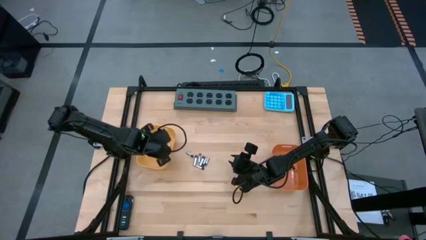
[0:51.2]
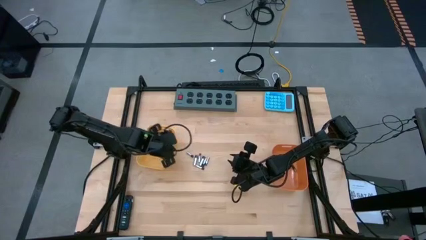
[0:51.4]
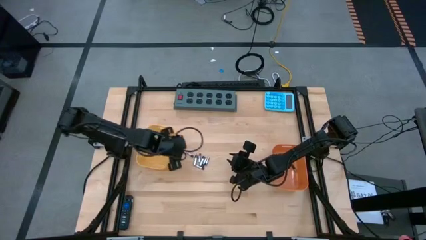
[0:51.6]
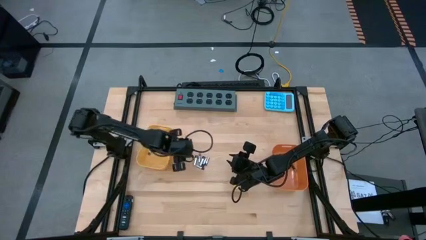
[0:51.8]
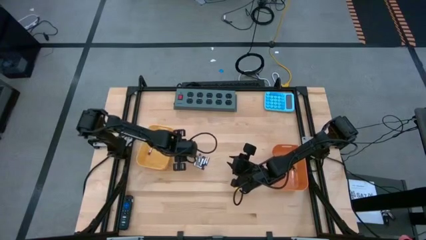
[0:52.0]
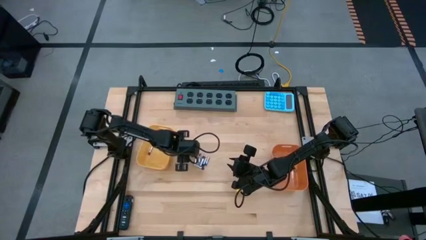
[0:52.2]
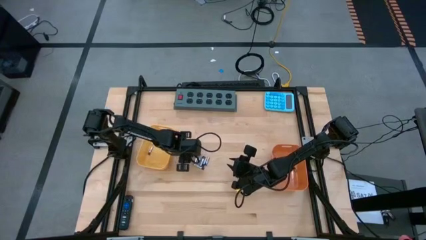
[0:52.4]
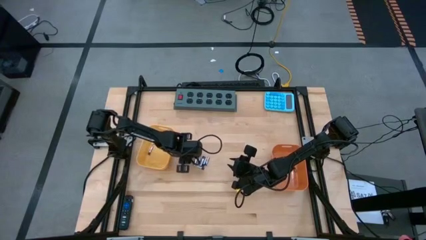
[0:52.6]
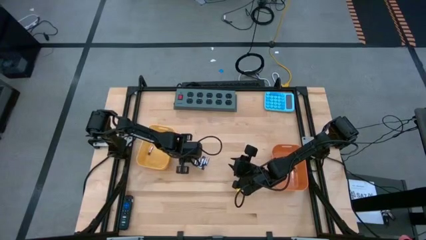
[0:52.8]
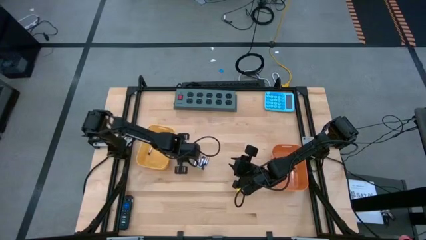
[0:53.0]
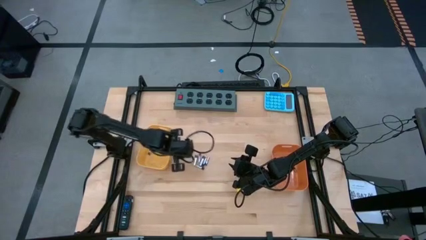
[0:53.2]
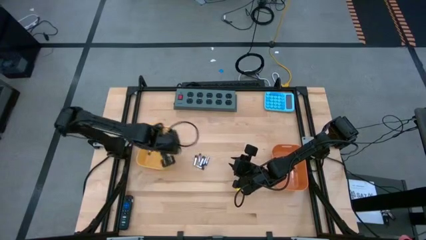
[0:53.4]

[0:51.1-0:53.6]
Task: Sort batteries
Put the silver battery into the yellow bin

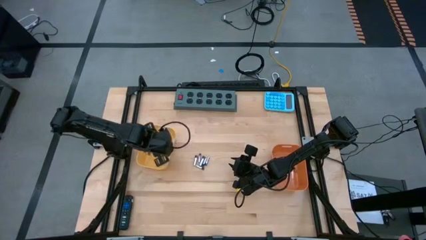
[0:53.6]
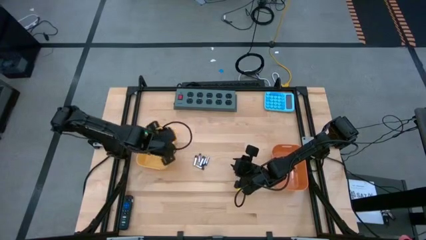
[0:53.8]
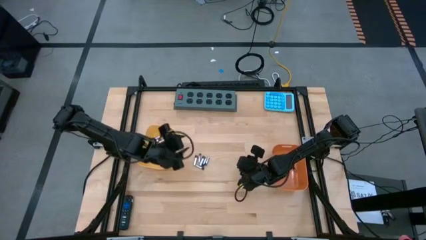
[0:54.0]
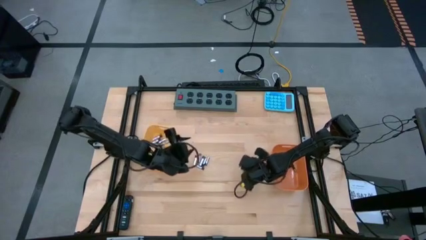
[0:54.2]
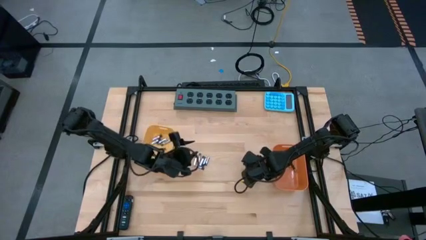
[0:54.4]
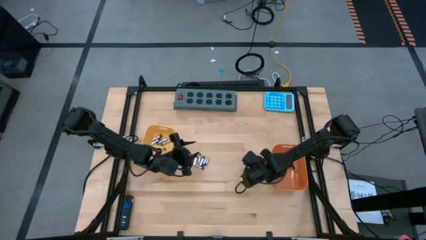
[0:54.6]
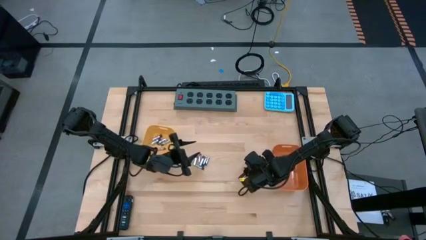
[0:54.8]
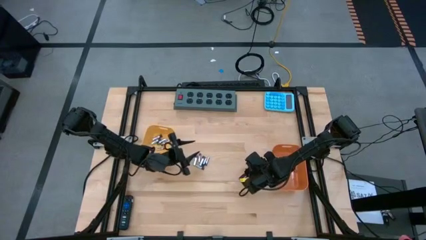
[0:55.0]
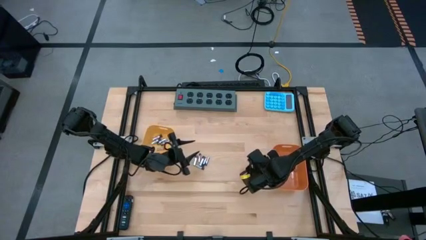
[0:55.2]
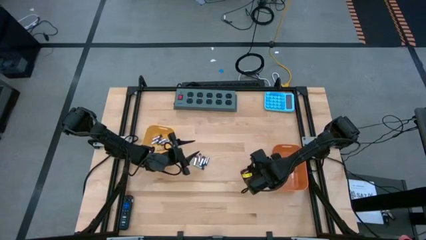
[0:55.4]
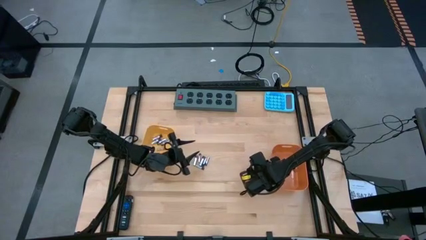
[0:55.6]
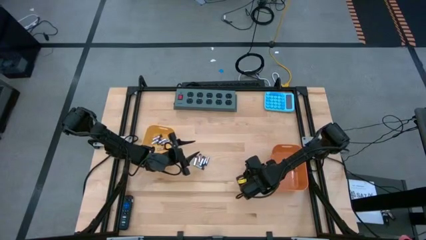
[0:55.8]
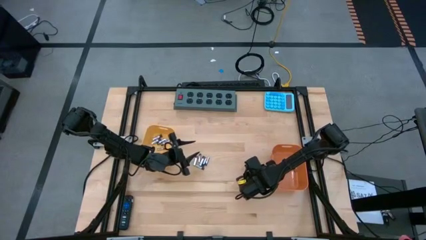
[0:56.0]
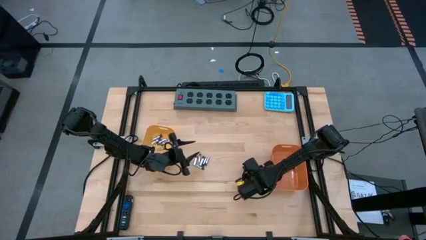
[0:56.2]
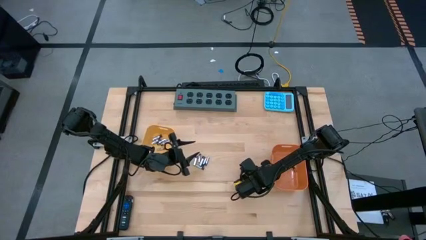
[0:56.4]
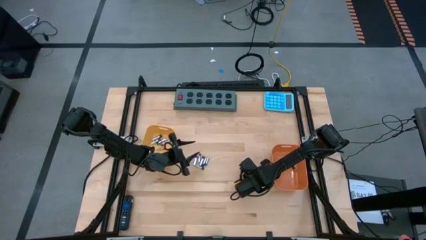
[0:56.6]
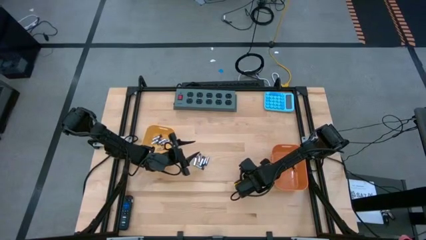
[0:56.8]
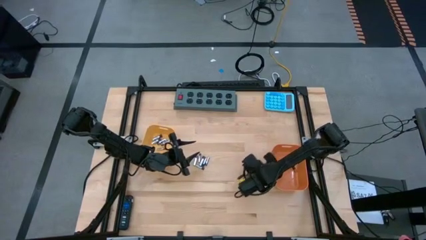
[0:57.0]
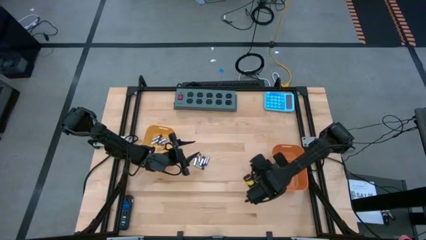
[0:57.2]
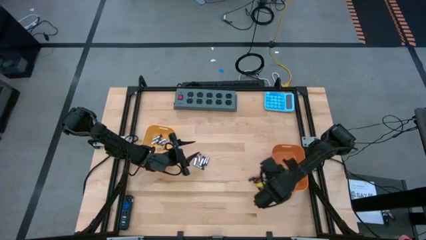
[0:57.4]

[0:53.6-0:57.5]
Put the black battery into the orange bin

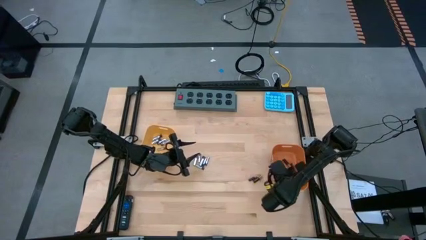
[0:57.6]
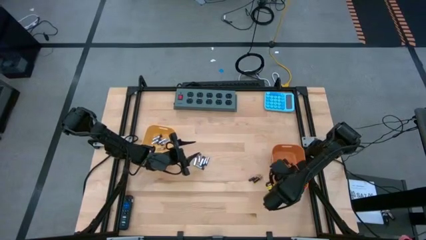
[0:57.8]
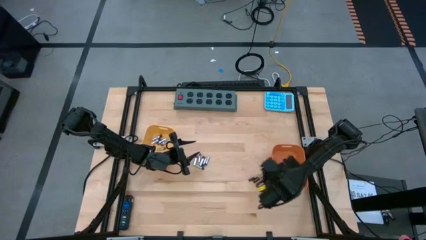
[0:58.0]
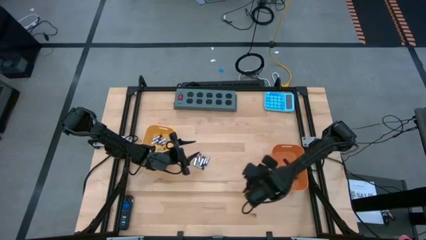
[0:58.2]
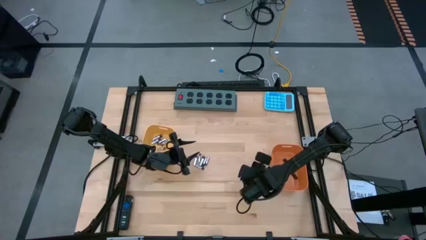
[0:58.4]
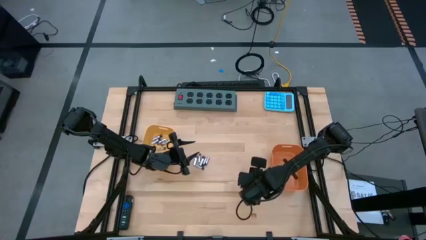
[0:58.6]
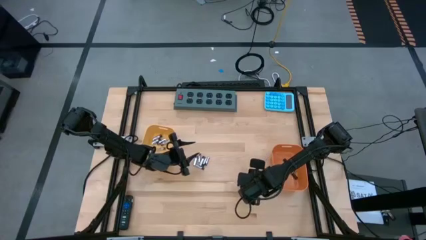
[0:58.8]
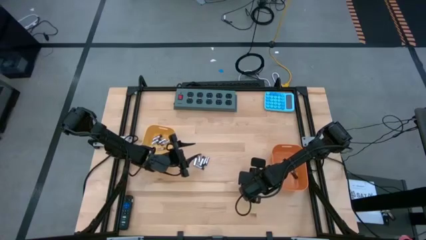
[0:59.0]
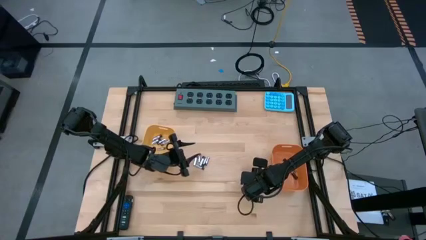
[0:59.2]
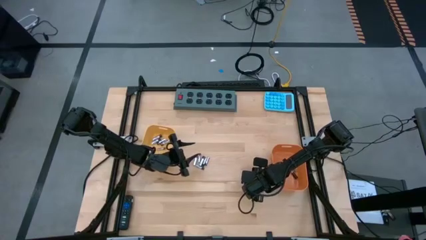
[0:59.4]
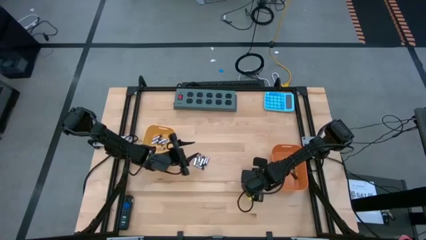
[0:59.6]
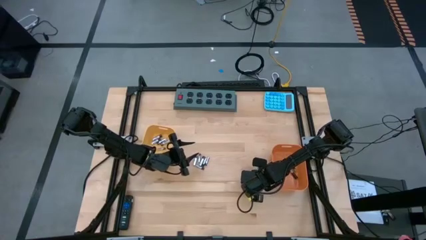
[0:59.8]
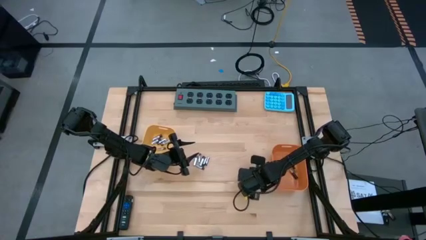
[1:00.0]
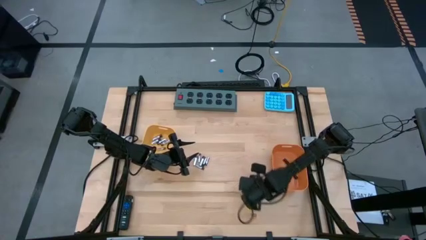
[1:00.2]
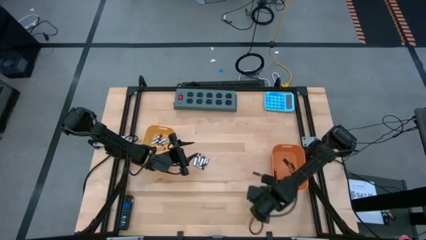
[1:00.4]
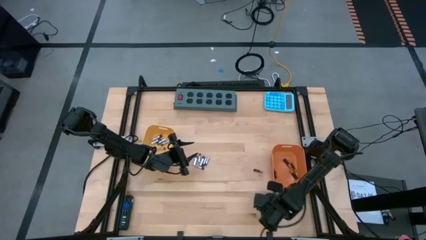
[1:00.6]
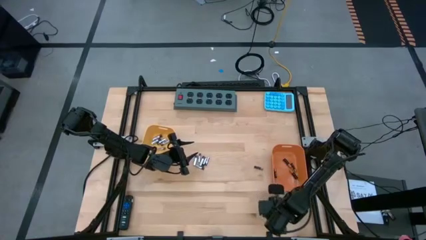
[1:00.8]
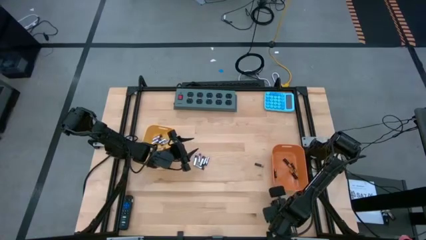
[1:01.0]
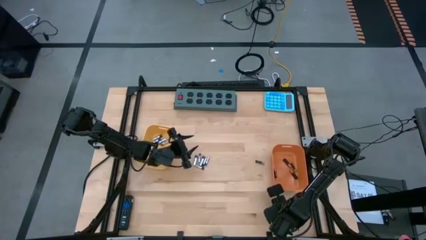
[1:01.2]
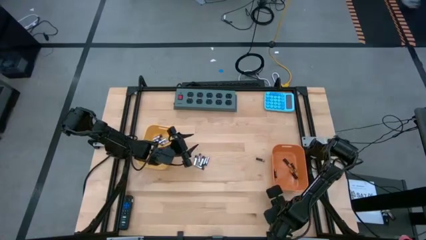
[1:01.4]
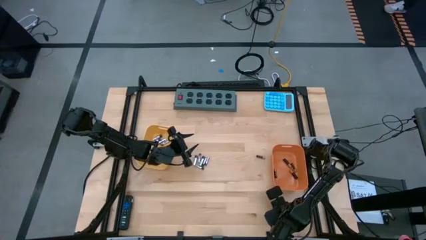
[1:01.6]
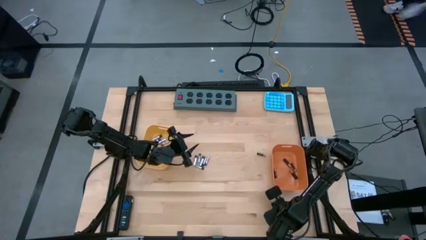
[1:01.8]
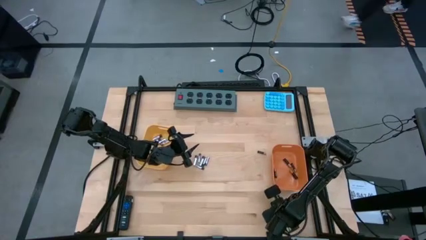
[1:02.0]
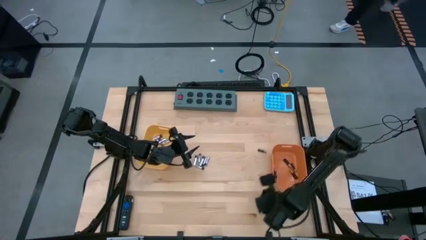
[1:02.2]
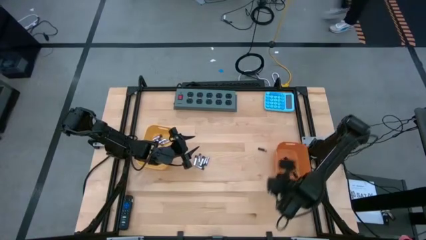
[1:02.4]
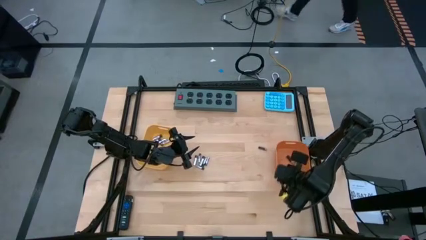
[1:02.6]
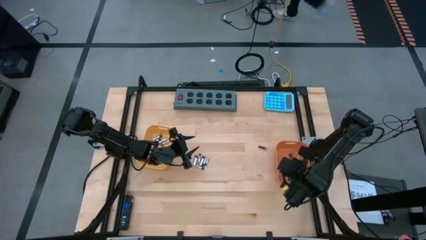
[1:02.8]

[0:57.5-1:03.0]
Put the black battery into the orange bin

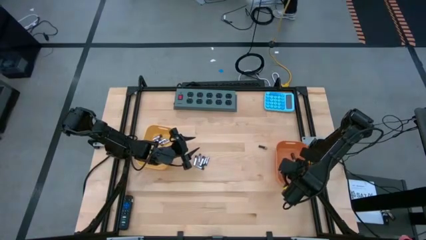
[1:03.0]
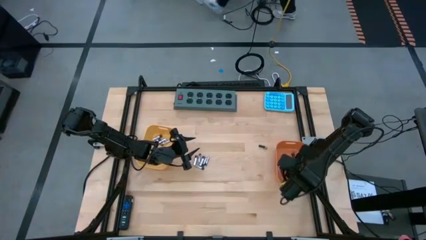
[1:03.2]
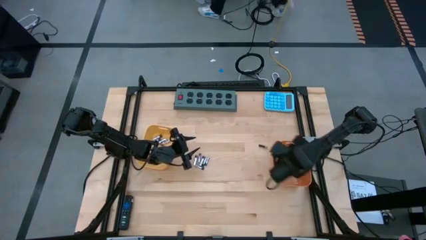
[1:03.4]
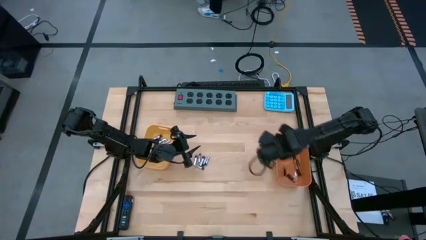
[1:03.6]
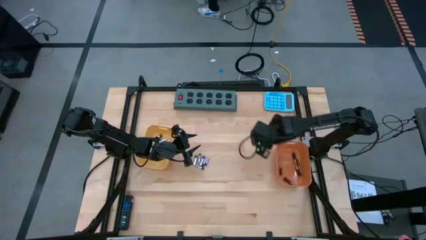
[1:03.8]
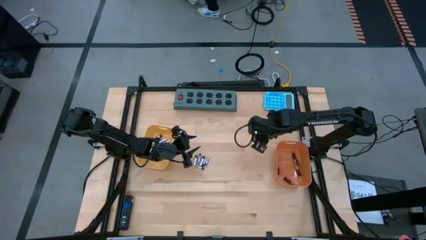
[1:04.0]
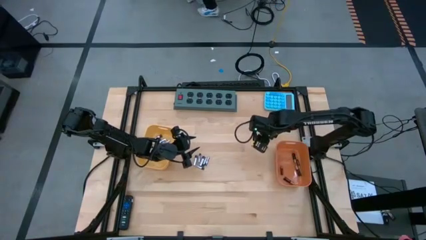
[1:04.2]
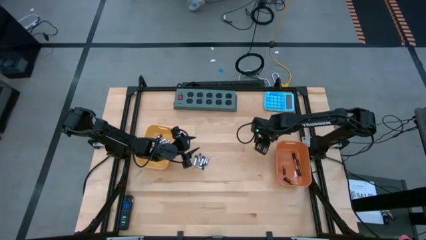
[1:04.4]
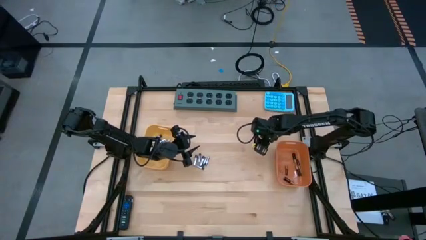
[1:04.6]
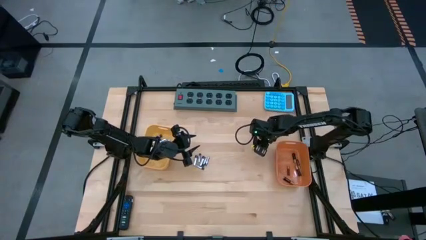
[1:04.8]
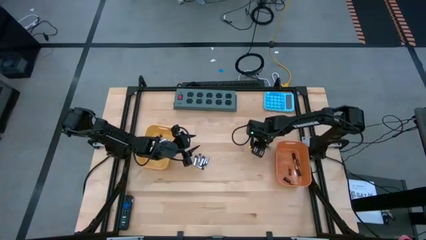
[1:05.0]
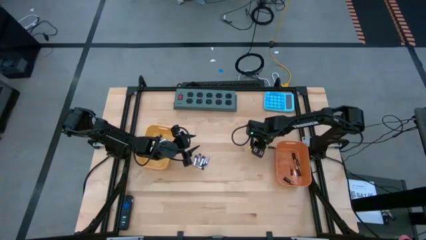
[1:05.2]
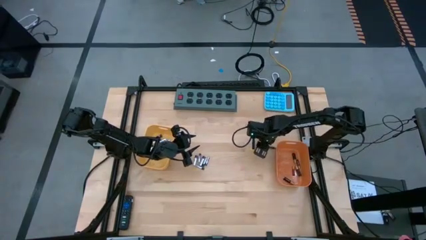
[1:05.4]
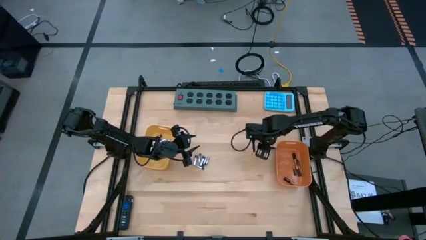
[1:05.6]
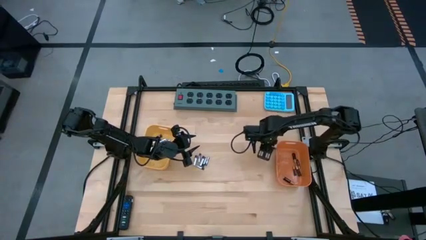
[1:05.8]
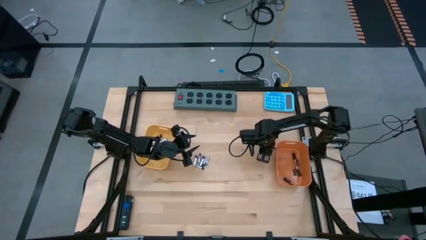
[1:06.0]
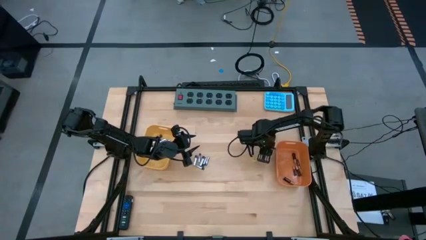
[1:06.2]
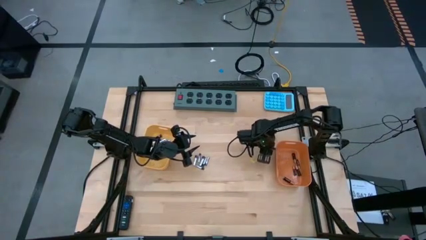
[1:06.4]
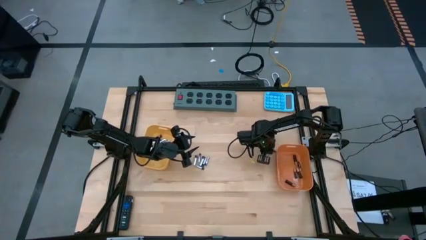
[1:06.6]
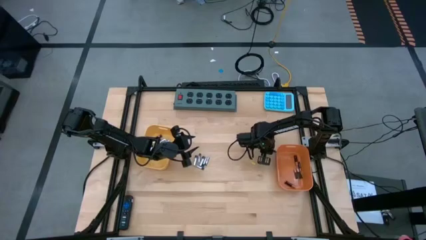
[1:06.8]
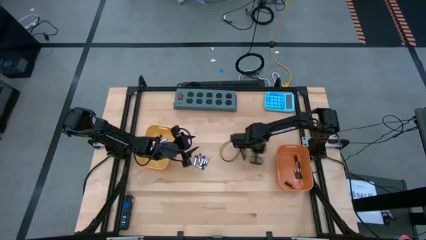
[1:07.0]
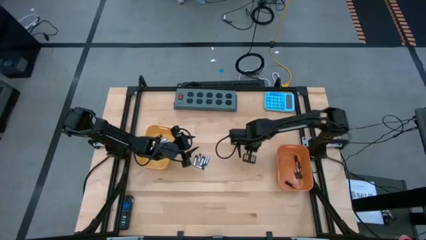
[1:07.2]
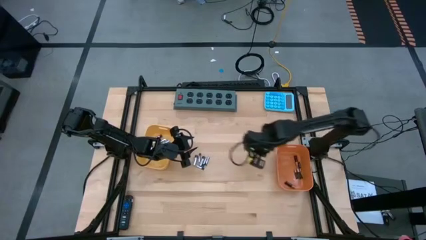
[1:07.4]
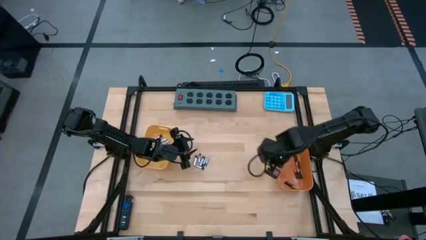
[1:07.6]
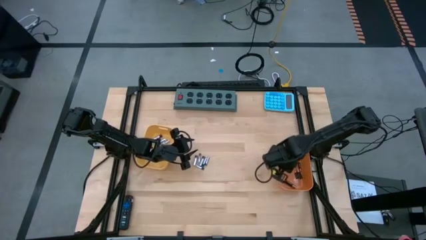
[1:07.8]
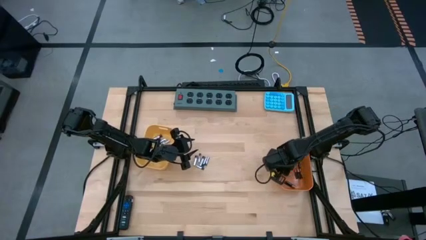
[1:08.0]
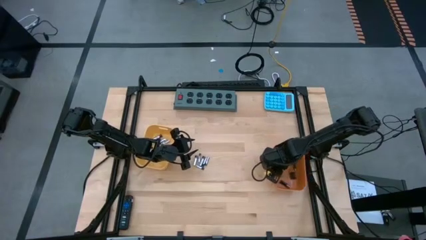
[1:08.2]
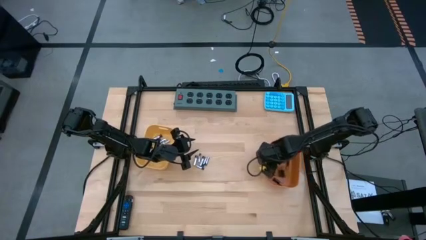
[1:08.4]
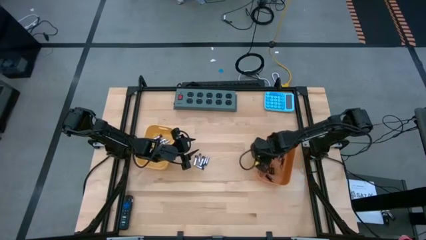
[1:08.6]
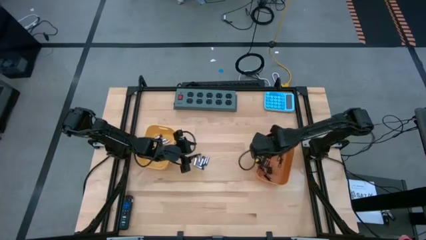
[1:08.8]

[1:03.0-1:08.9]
Put the black battery into the orange bin
